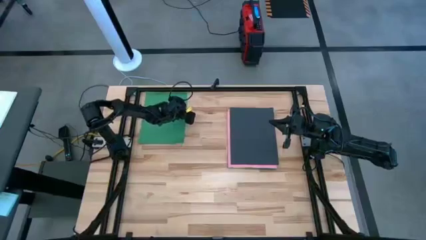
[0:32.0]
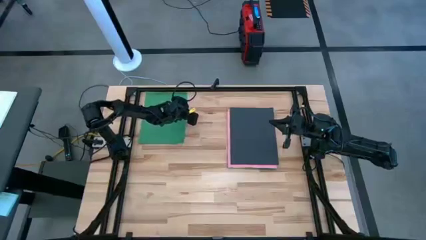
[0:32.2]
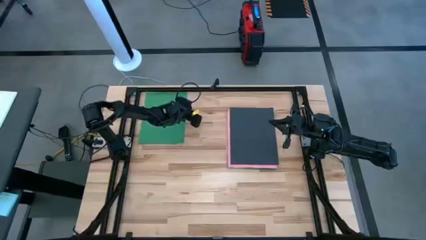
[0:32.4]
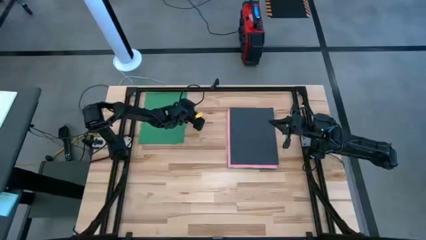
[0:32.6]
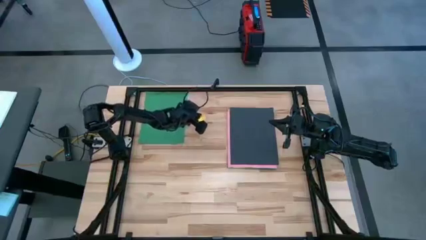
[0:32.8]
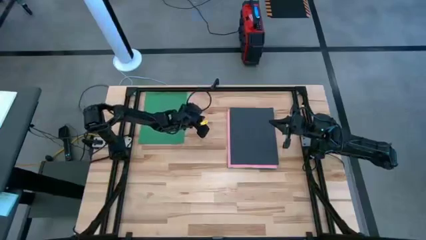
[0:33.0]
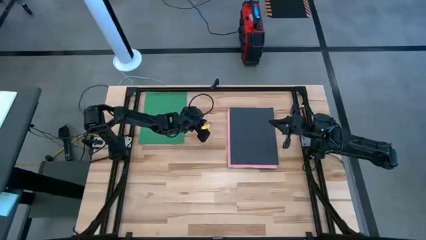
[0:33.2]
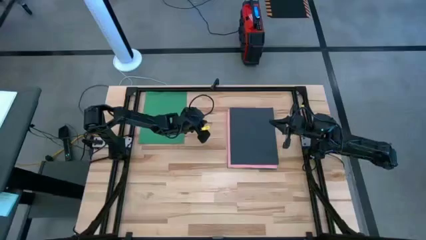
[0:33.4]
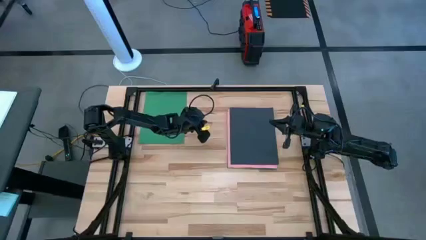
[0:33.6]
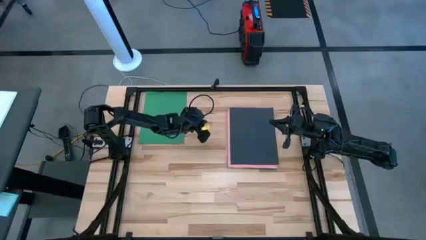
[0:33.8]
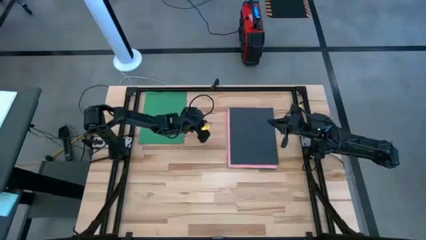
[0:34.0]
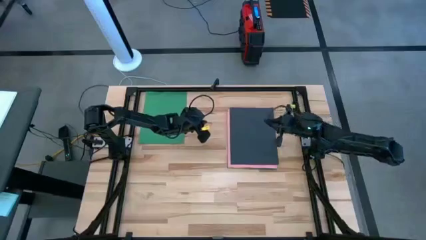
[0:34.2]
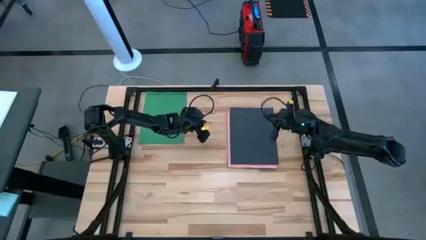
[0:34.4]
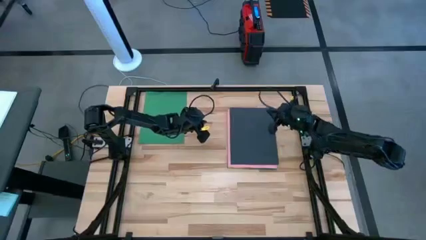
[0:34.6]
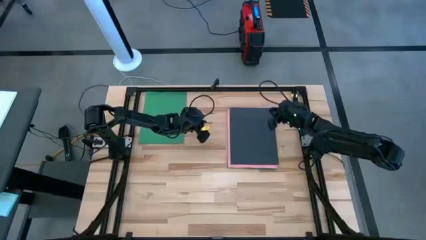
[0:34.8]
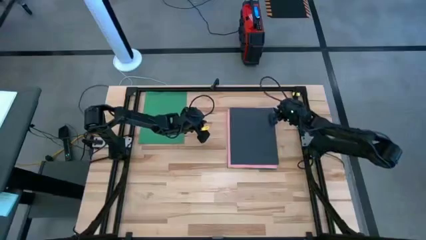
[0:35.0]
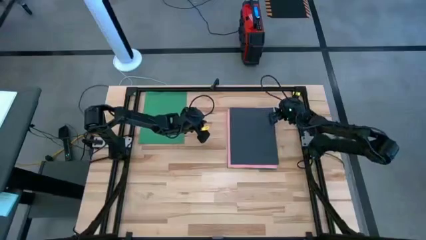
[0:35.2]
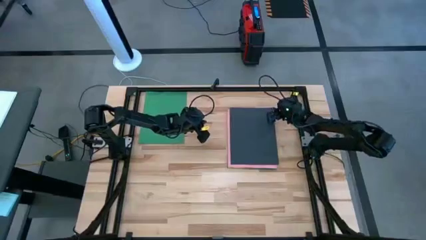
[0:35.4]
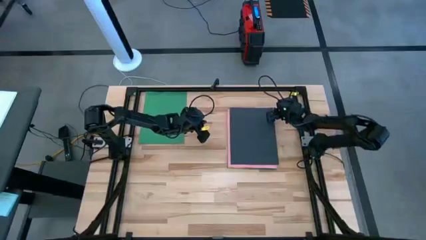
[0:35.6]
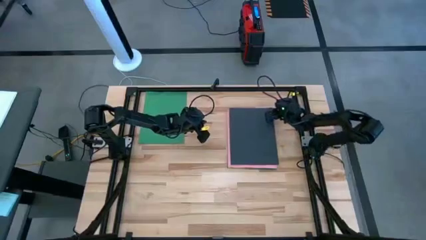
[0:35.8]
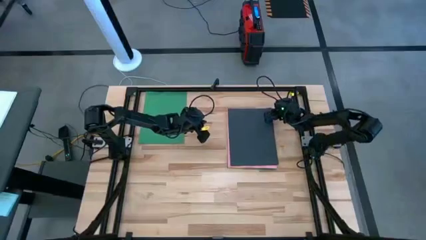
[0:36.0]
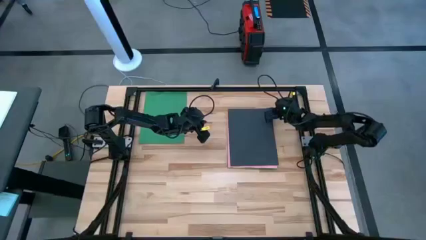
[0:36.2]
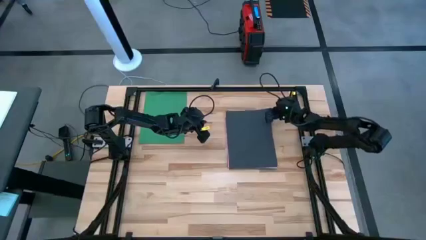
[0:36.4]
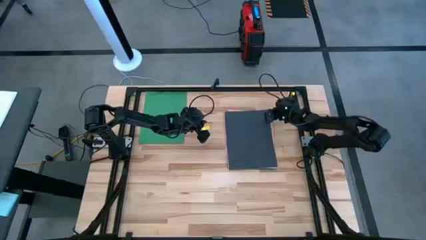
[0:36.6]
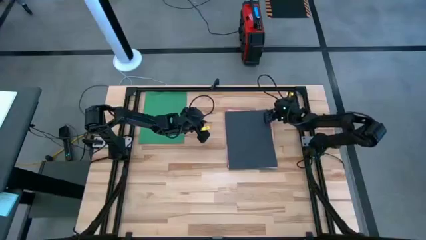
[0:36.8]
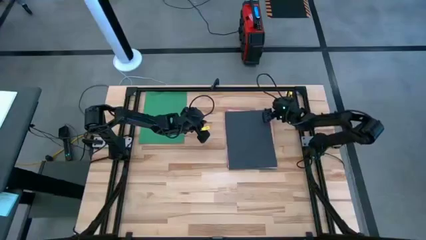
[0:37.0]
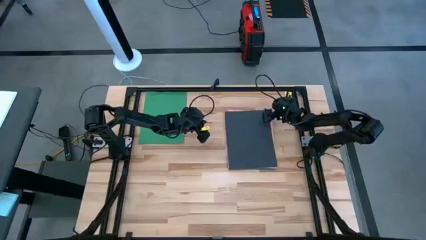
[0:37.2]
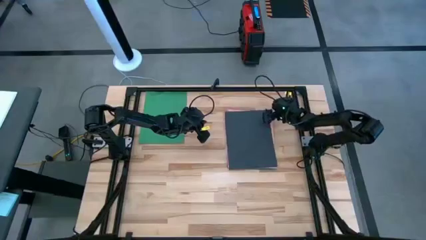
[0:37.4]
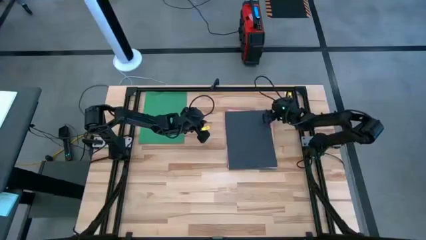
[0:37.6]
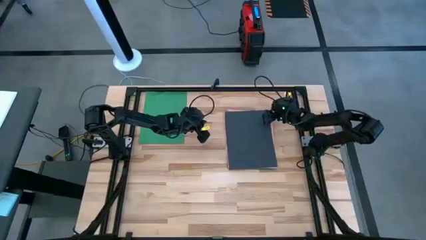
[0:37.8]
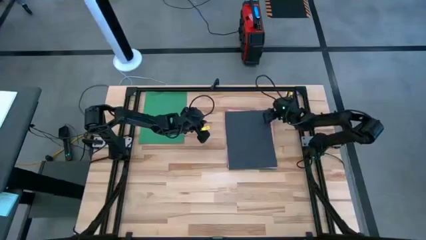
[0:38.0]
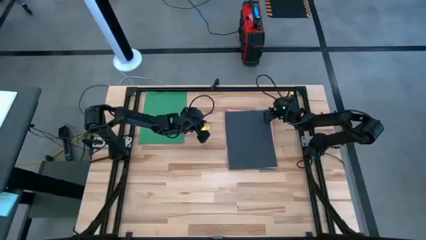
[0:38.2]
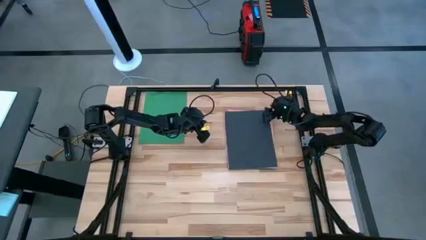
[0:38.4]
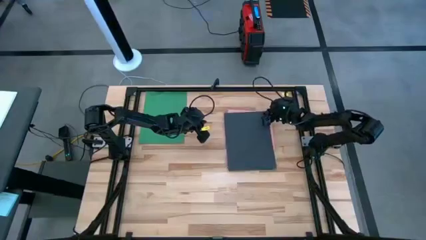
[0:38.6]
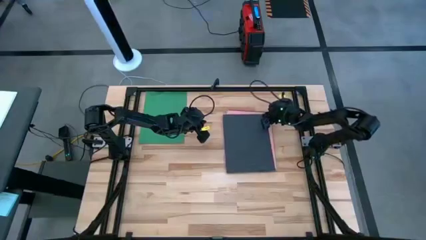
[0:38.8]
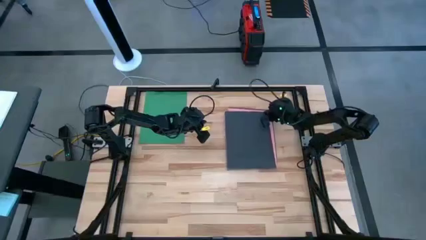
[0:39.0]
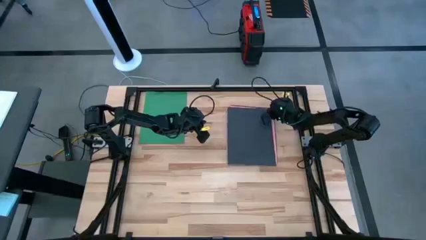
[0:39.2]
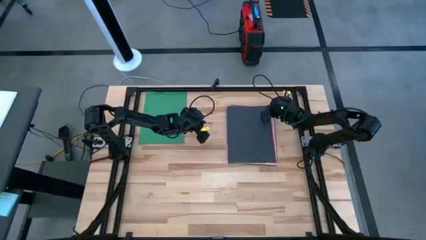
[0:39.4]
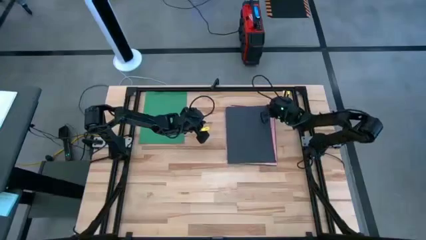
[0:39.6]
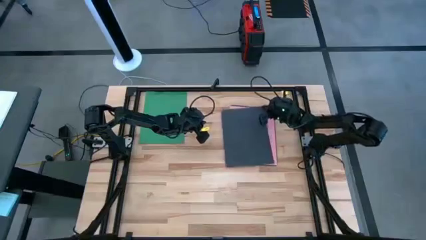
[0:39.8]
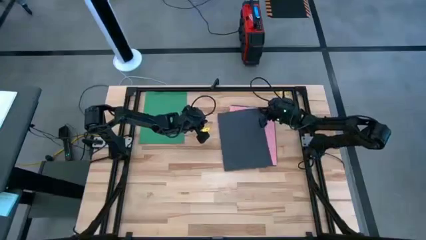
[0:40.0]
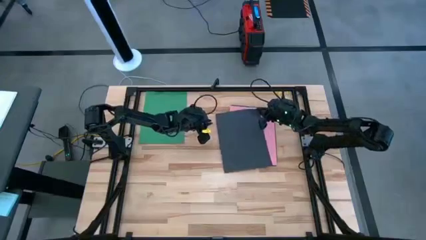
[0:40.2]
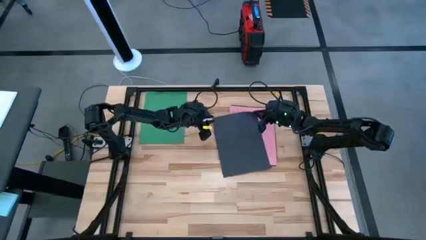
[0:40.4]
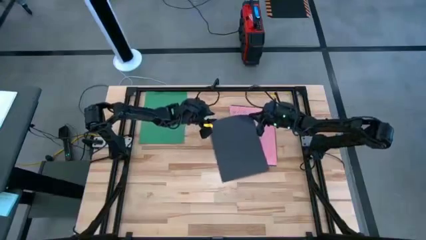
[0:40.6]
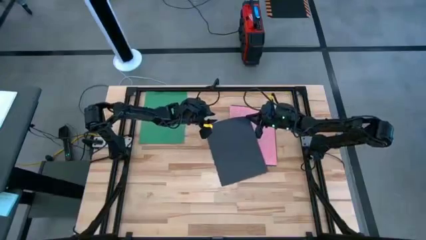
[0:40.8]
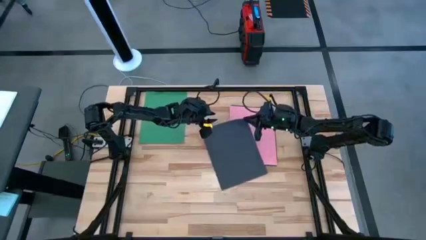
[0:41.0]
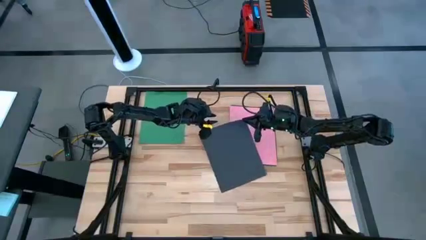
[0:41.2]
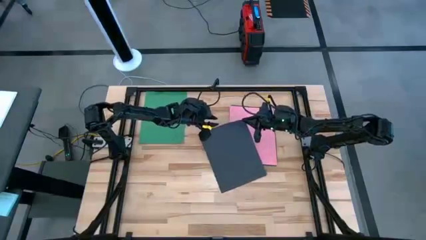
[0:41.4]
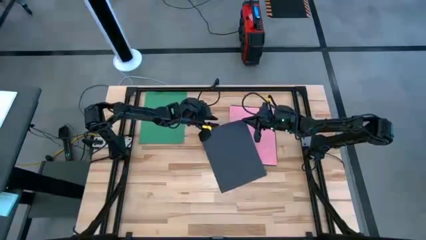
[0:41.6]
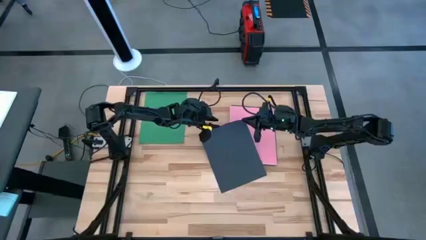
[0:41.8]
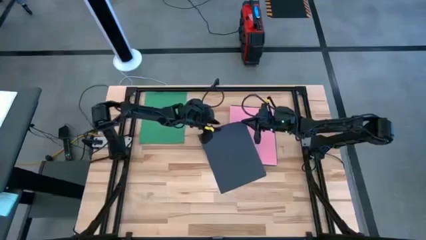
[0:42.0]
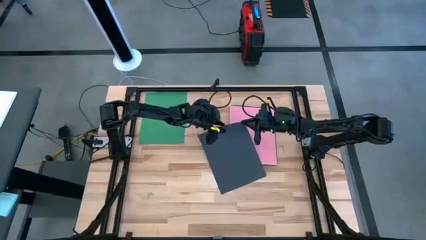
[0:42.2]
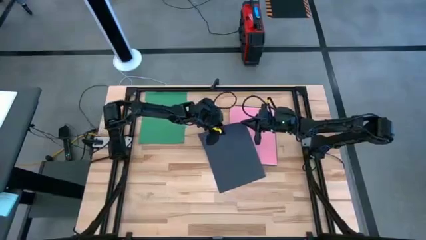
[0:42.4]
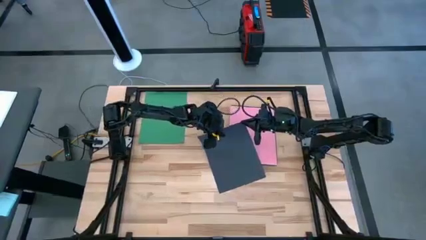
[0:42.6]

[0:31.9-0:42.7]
Task: Organize paper
Move the black paper to the bottom left of the table
